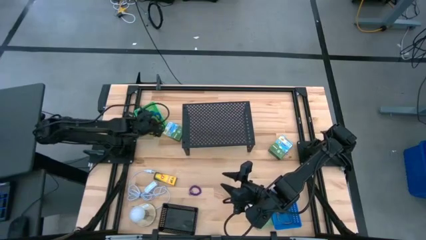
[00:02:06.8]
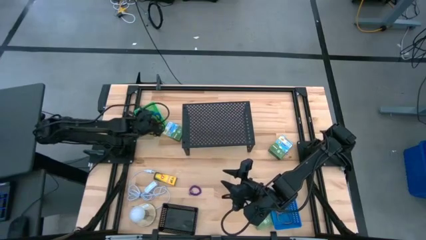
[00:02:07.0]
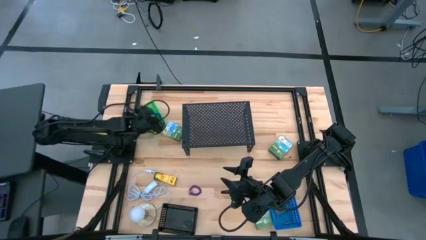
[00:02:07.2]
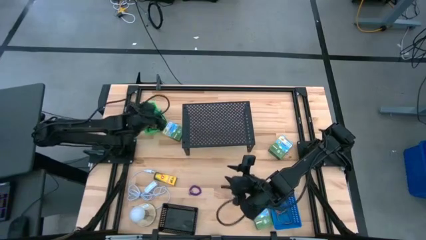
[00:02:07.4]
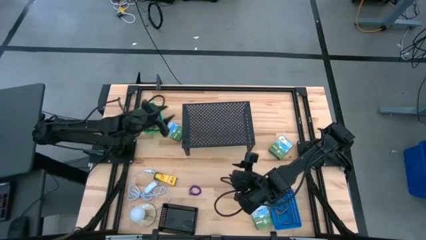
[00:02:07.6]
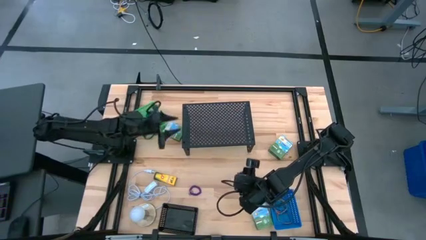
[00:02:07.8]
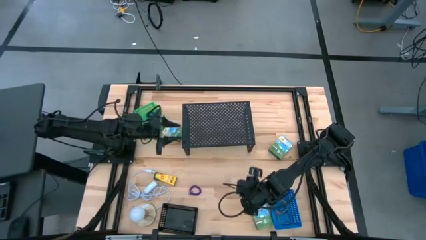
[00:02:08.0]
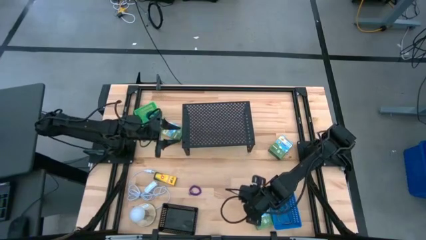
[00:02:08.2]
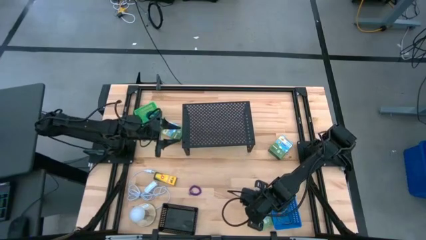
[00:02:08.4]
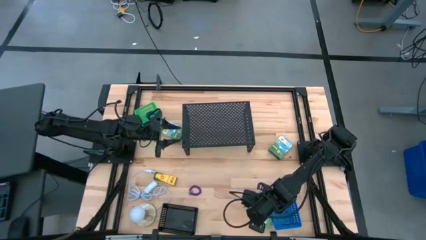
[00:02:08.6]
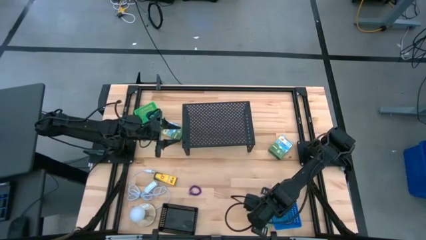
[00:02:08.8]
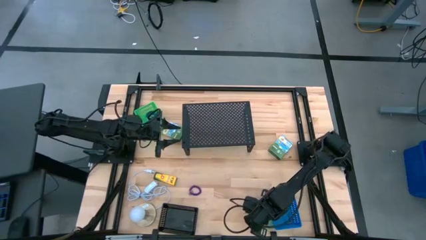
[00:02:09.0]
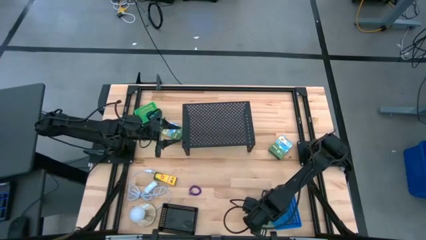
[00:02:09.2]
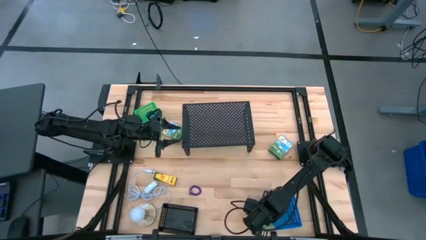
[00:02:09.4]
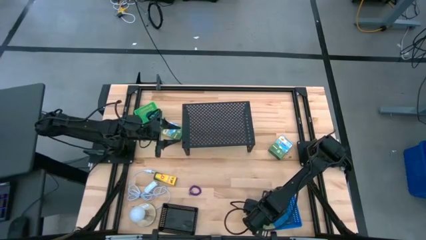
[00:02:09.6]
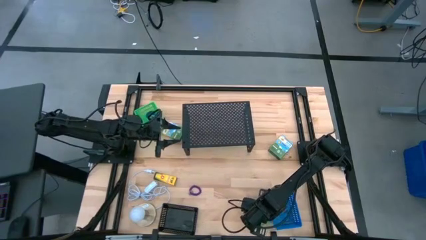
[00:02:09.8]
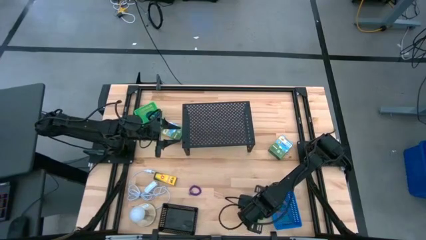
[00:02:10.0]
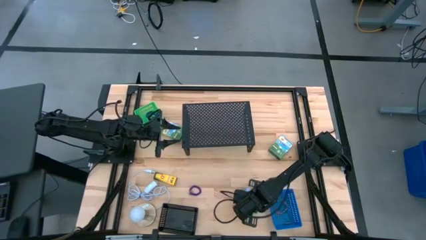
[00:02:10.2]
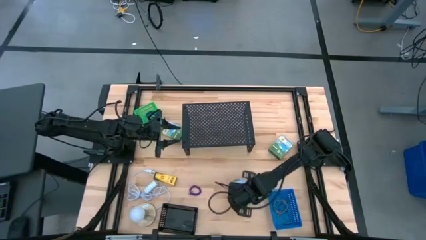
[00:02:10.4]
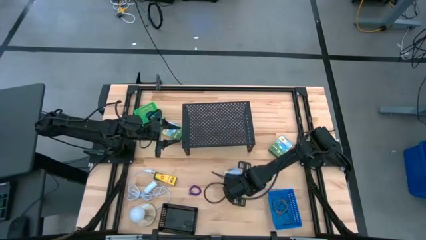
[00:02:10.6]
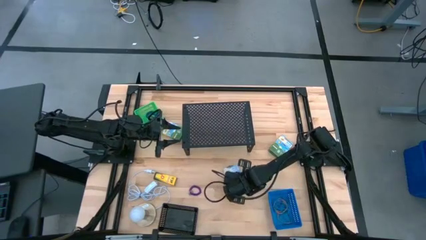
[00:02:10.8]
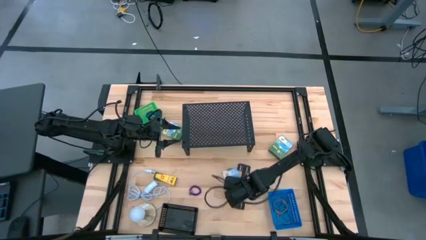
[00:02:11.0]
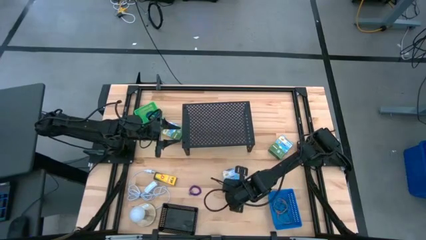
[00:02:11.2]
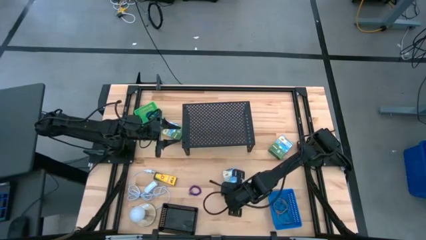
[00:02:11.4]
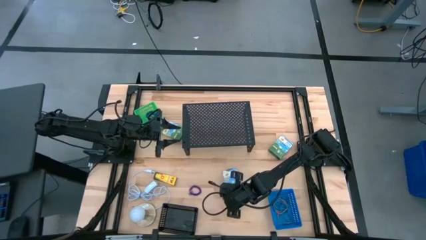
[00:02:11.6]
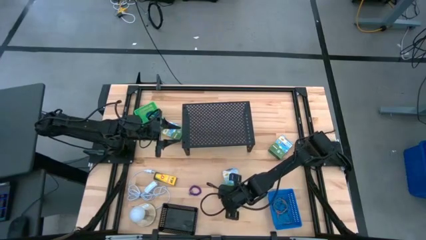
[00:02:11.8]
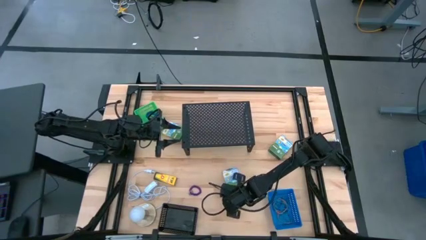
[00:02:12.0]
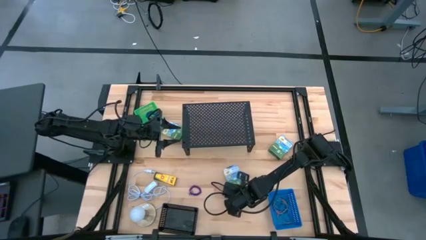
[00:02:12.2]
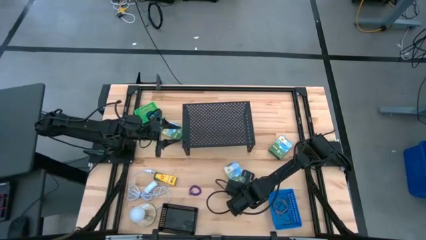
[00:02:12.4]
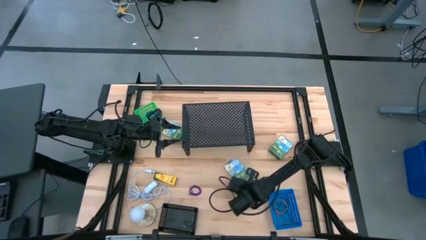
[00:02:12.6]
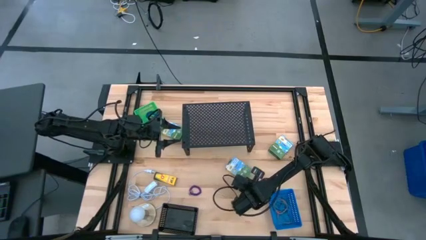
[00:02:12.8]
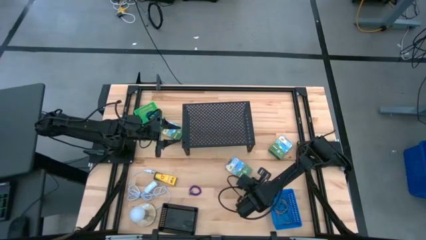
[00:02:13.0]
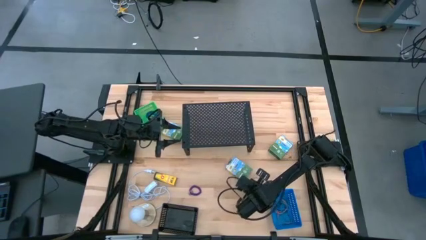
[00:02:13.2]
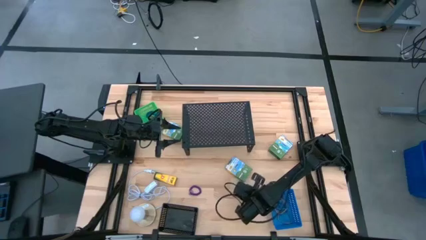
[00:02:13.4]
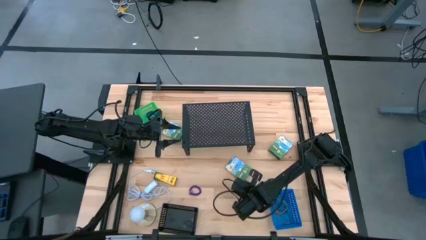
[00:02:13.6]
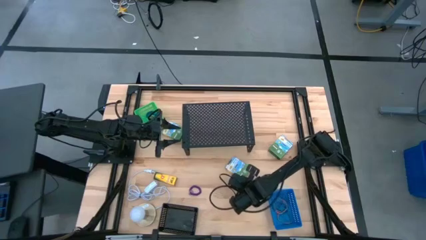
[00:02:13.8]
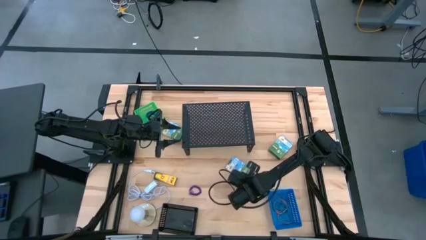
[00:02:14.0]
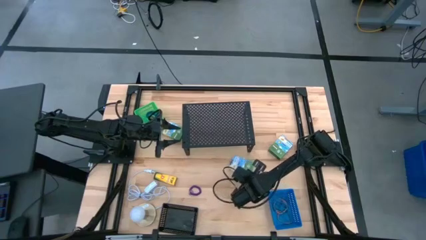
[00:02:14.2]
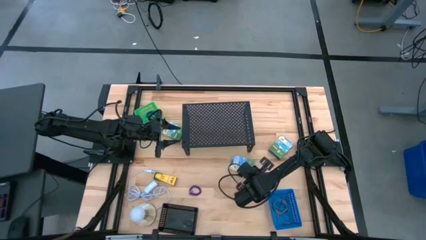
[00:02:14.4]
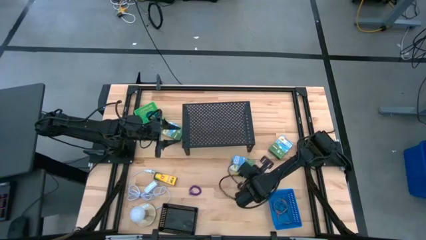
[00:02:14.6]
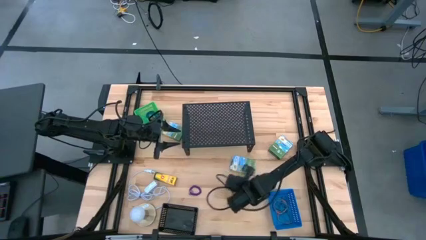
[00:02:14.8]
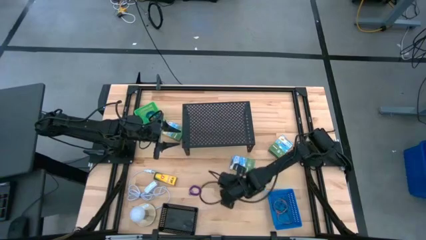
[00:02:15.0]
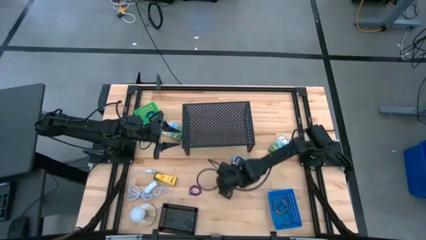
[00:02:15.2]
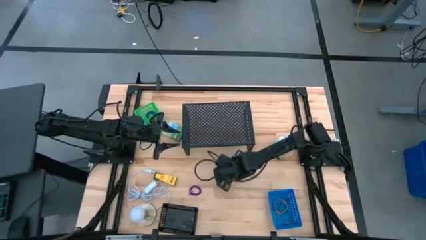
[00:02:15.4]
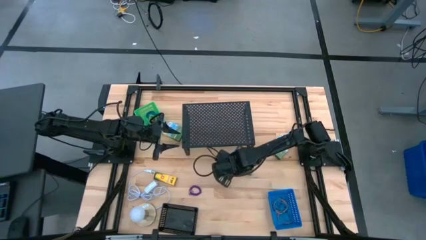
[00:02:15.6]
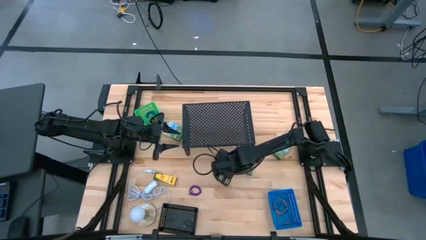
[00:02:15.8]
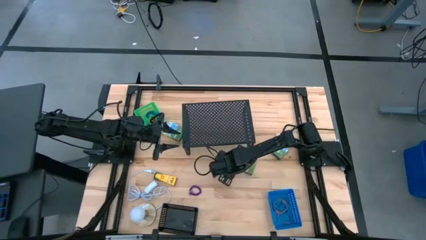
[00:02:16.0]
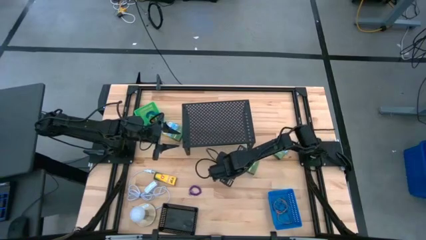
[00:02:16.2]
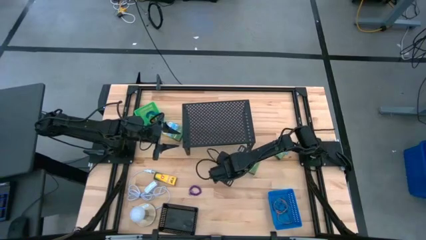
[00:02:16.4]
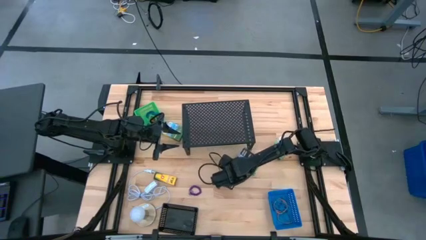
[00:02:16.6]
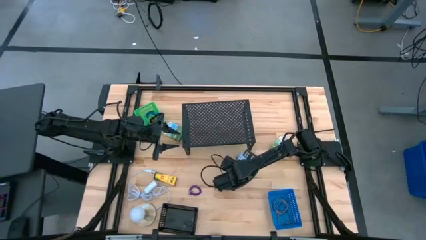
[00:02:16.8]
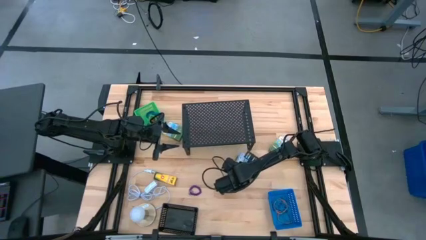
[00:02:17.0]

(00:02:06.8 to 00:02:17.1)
Task: Pick & Place Office Desk Supplies
Put the yellow crayon box into the black bin

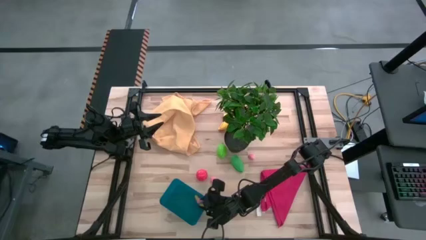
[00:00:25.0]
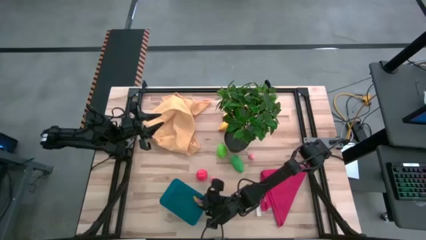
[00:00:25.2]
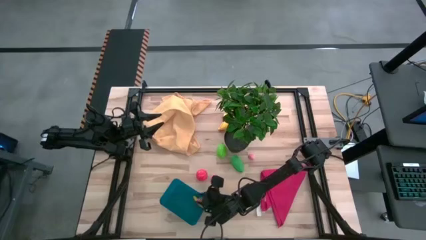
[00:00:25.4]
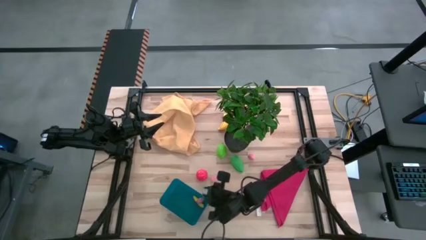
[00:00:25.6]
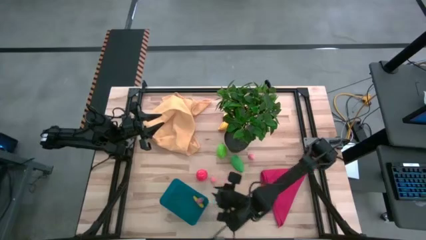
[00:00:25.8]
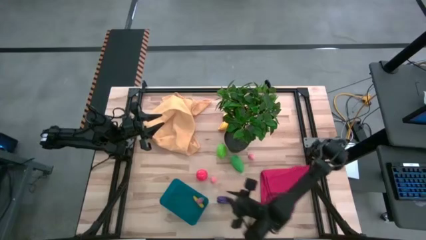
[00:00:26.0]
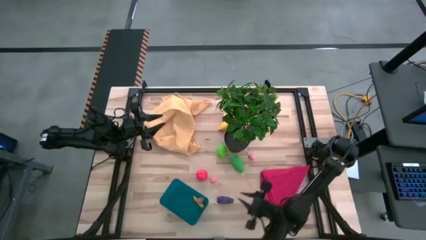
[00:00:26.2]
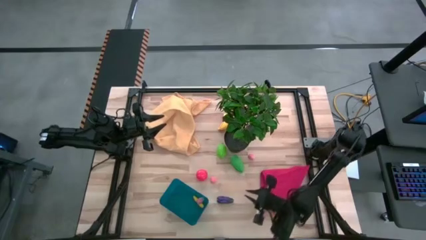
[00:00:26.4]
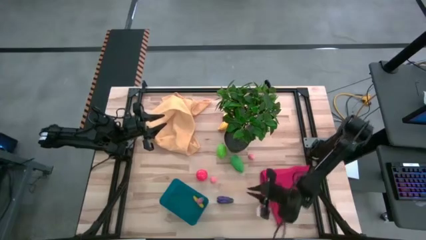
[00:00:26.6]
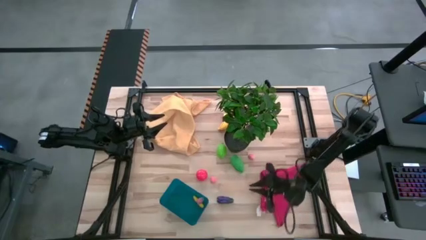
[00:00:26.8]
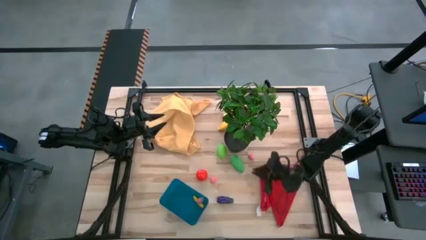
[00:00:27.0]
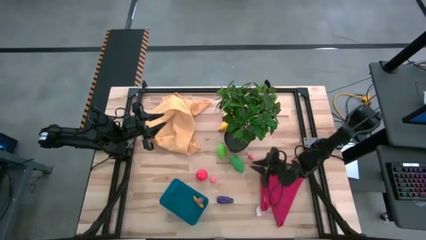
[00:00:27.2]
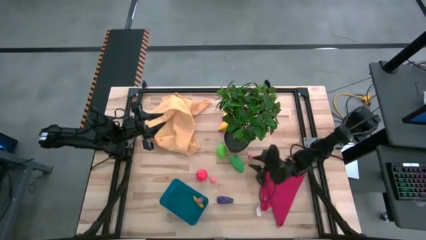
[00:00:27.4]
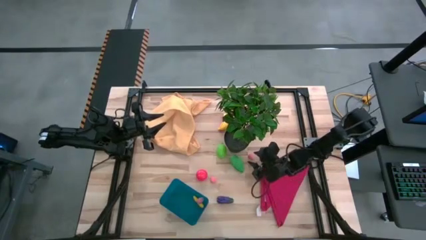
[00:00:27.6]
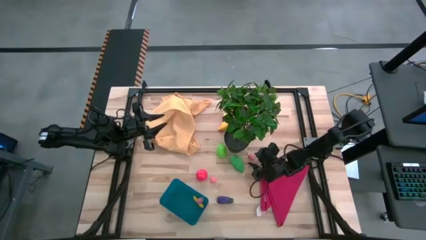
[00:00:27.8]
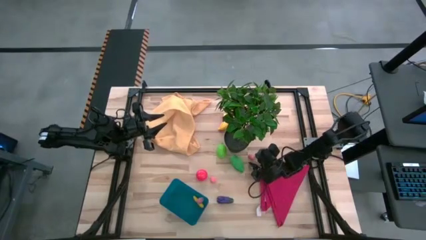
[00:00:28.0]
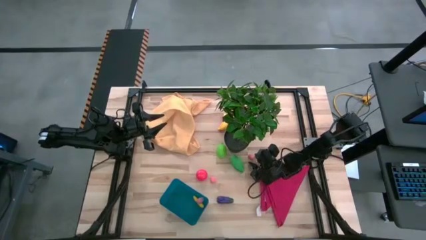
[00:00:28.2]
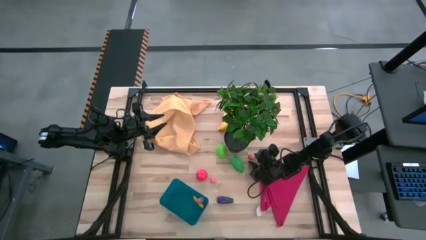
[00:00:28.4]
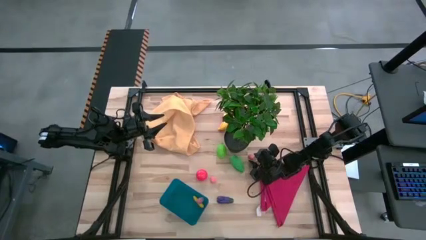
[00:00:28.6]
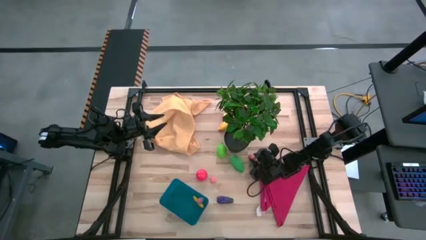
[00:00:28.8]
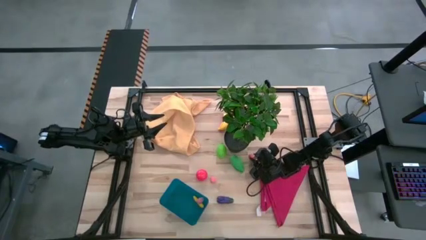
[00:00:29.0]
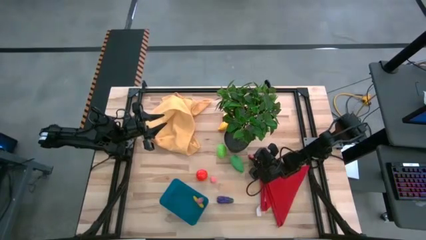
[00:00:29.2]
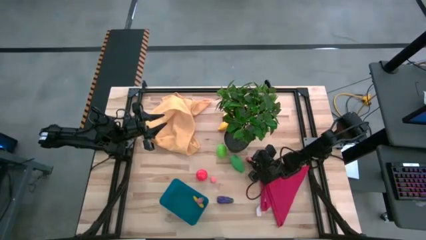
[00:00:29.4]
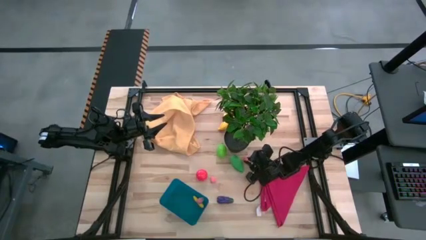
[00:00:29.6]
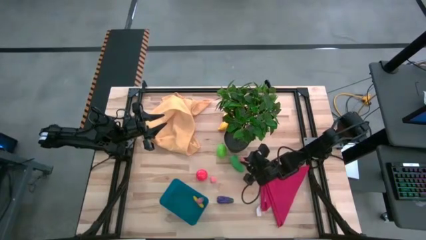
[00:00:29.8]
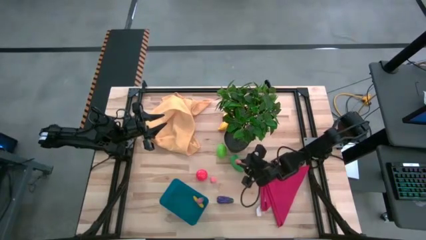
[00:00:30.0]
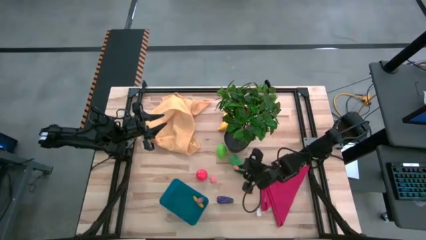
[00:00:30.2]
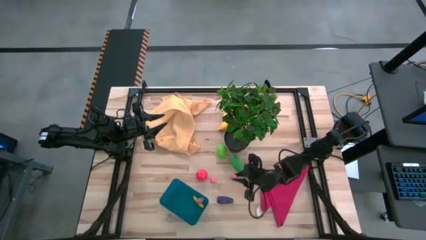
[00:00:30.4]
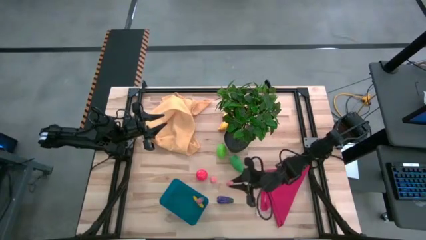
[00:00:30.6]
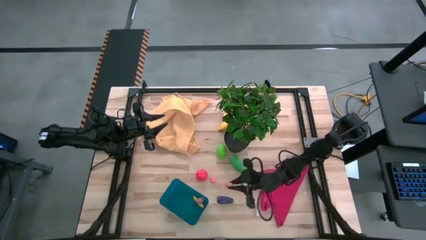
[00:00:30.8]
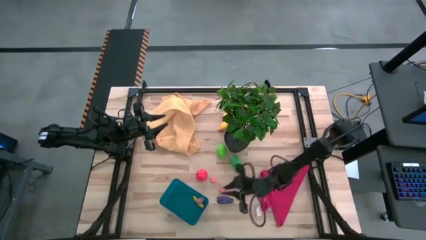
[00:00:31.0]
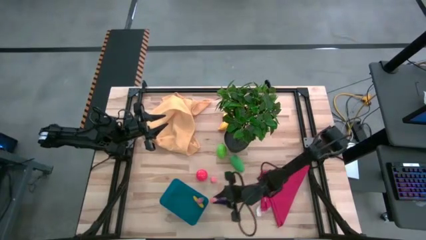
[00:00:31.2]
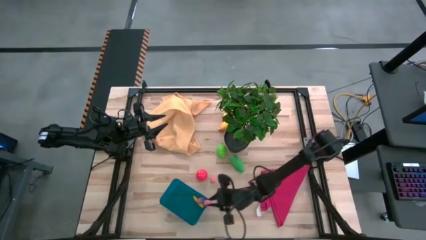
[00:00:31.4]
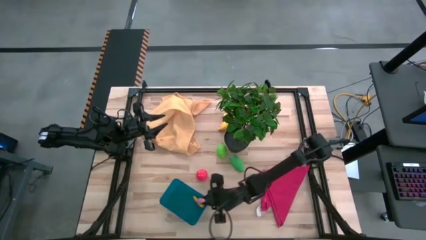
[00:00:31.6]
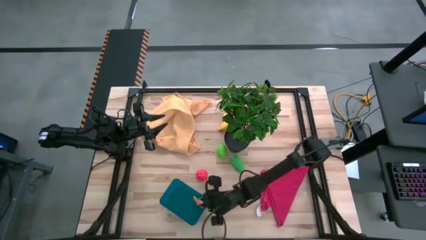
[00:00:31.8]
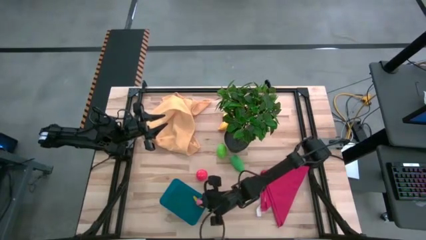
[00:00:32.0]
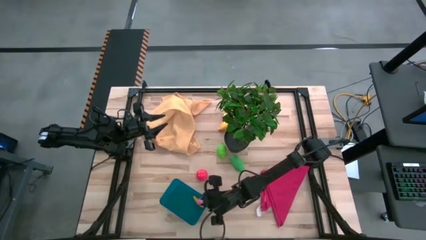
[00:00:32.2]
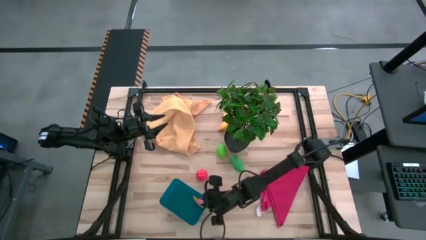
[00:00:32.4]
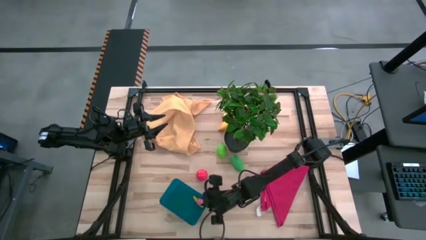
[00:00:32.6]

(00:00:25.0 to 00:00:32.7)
Task: Pick and placing Produce into tupperware
Put the top pink peach into the blue bin
